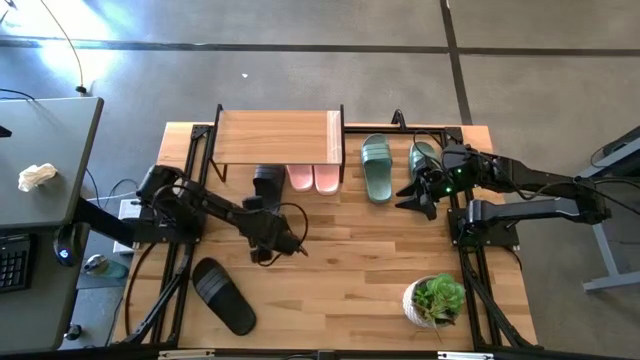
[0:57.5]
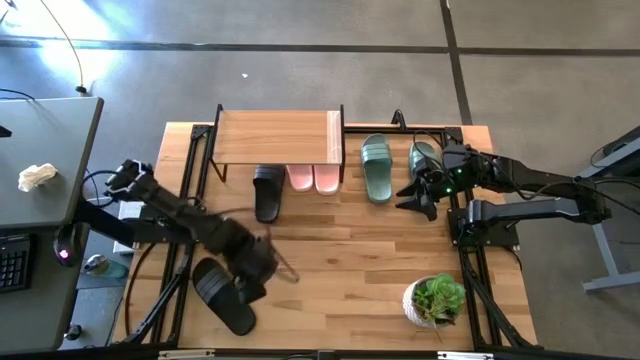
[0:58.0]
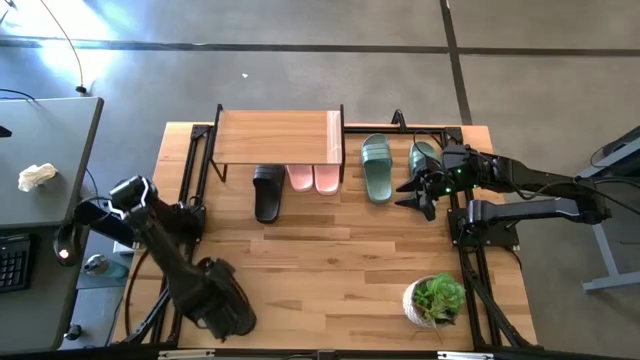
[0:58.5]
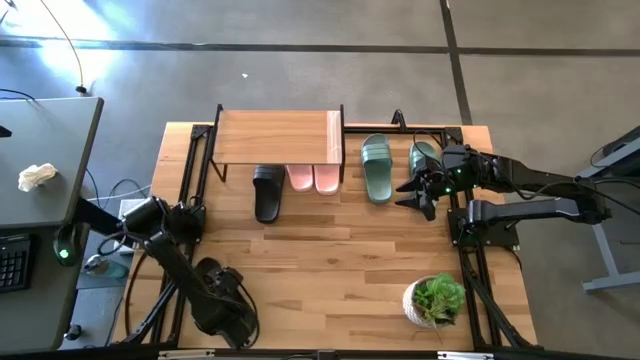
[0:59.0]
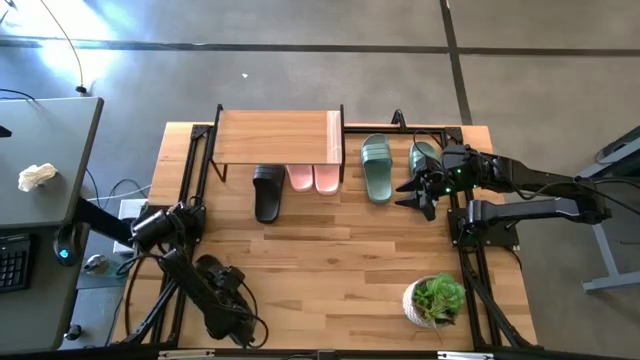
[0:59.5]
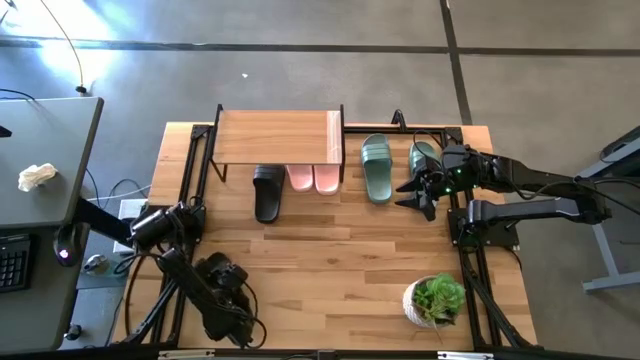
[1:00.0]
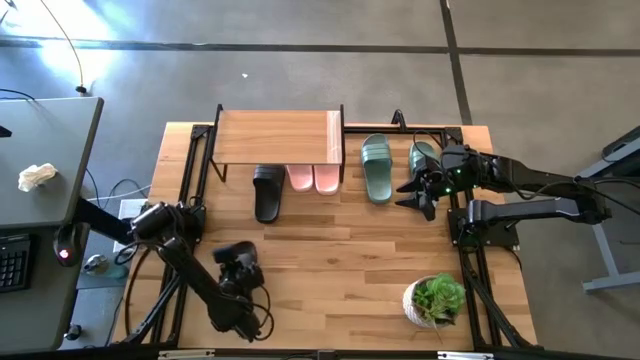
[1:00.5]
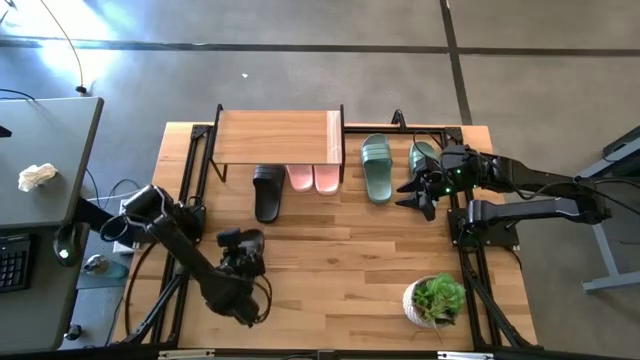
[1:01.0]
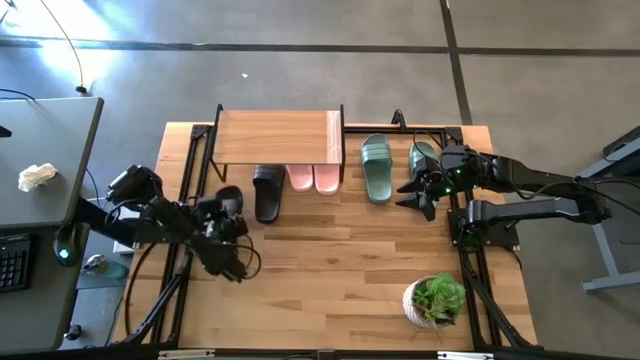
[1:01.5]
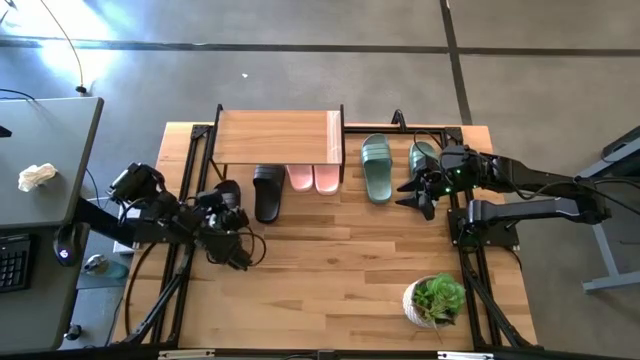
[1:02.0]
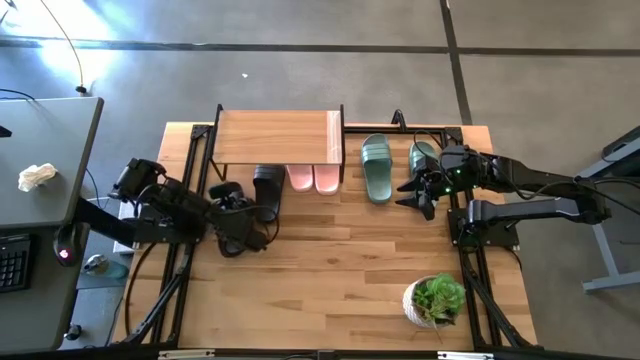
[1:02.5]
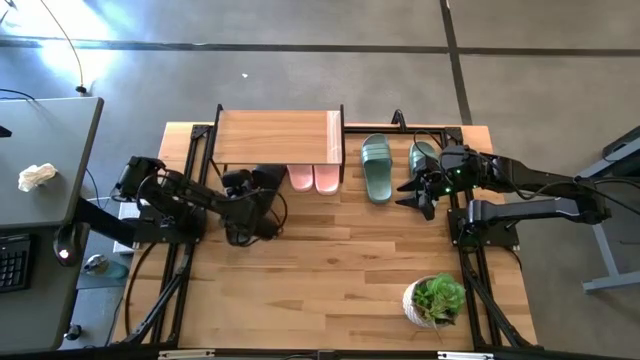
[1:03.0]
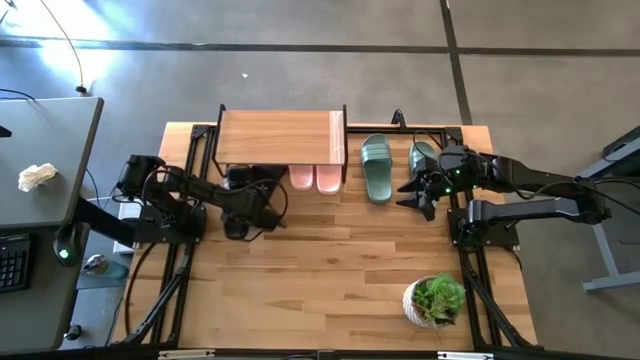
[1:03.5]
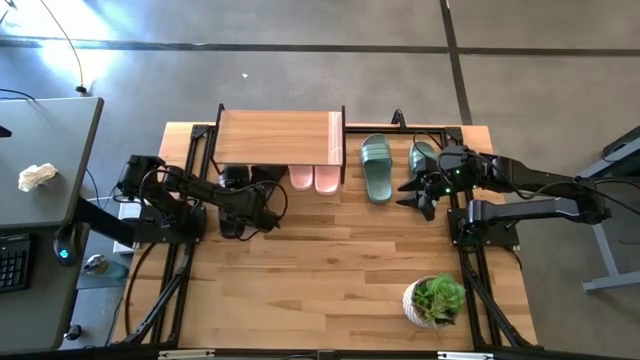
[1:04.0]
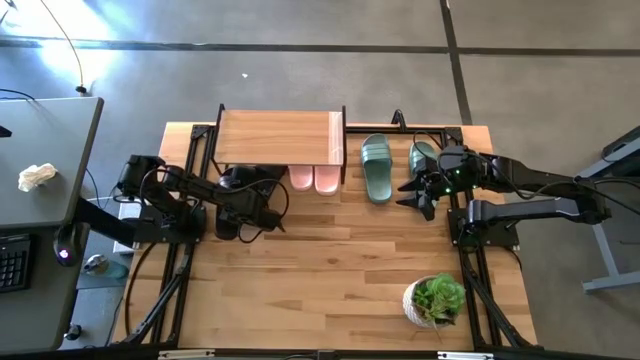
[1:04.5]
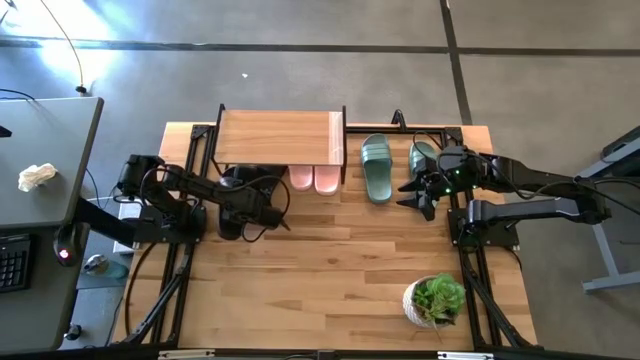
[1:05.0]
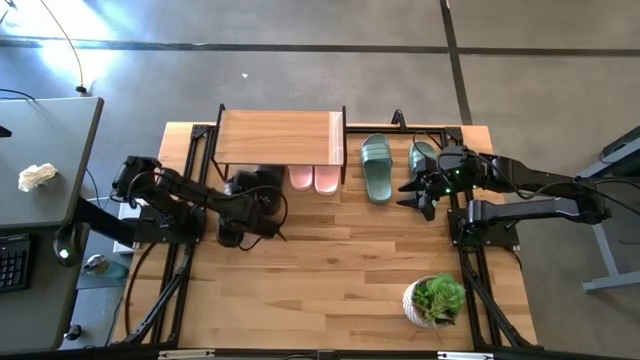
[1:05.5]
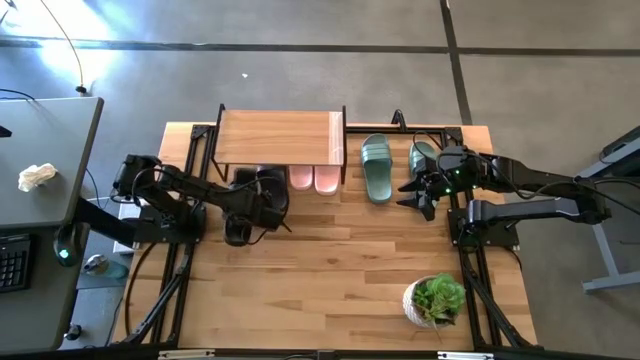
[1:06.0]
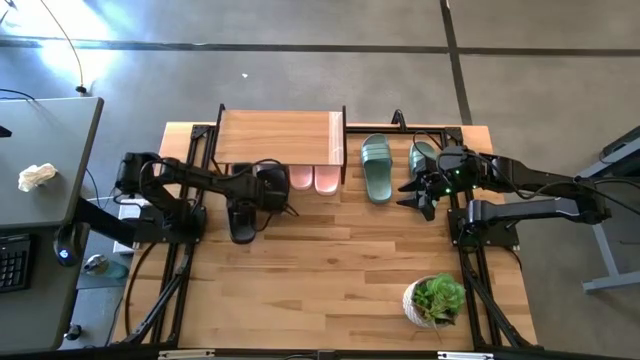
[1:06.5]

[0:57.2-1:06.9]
Task: Pick and place slides into the shelf
Put the left black slipper under the shelf

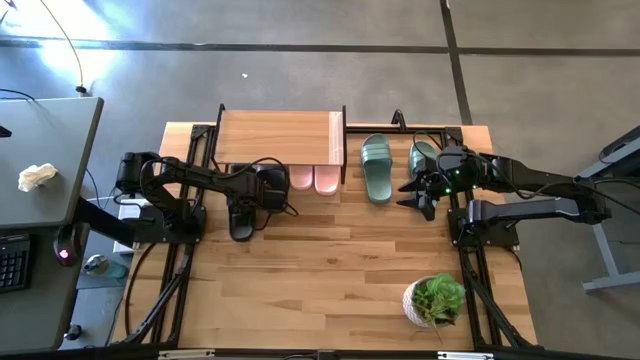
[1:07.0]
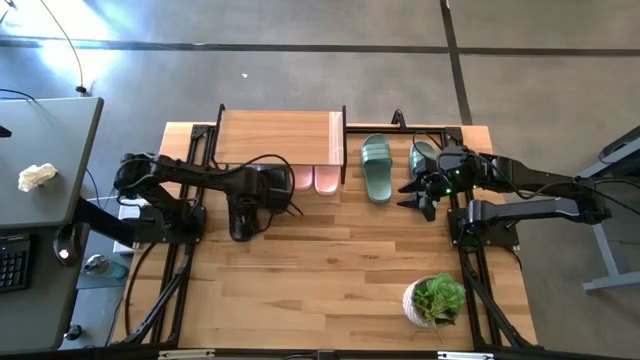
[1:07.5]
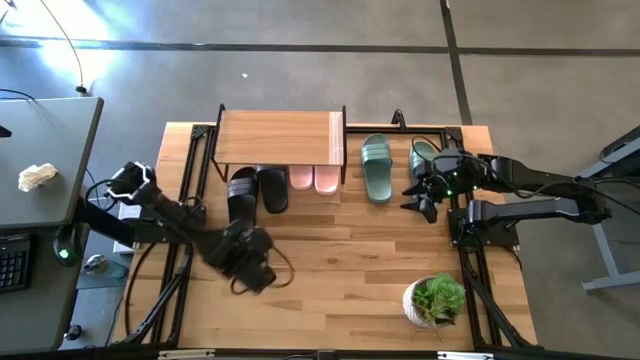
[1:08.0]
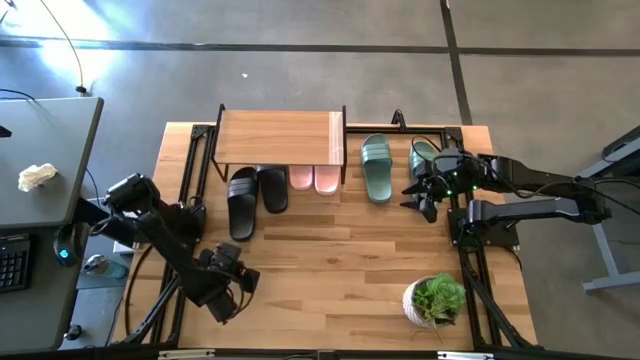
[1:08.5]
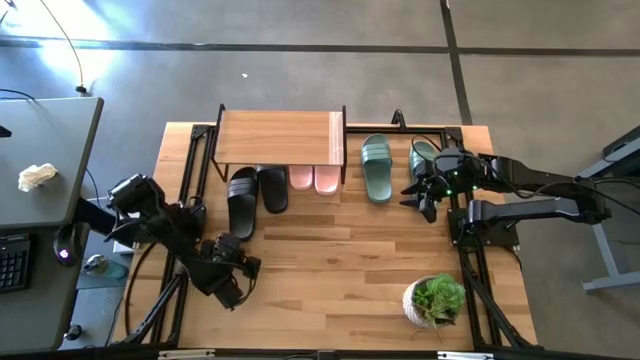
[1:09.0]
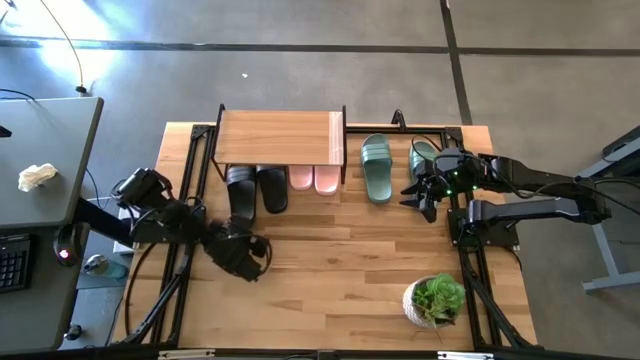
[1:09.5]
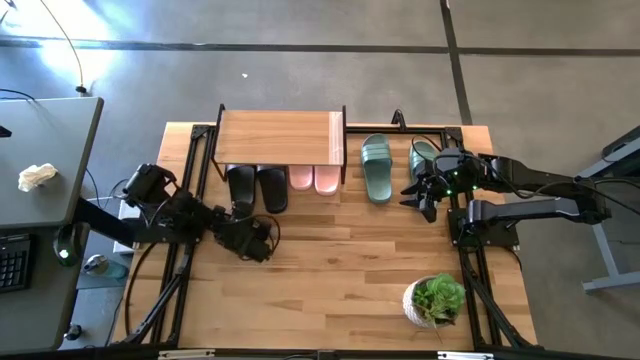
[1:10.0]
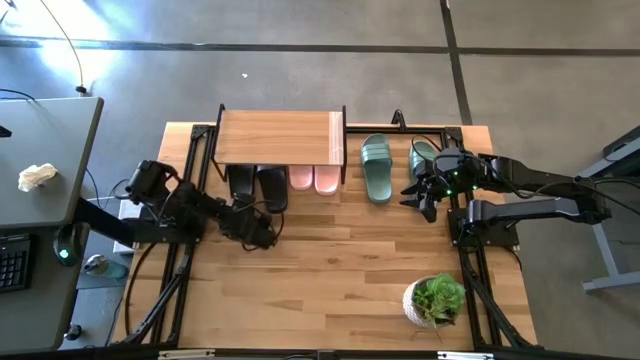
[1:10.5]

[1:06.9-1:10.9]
Adjust the left black slipper under the shelf

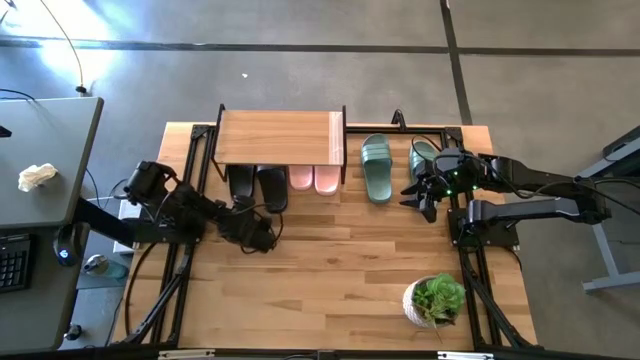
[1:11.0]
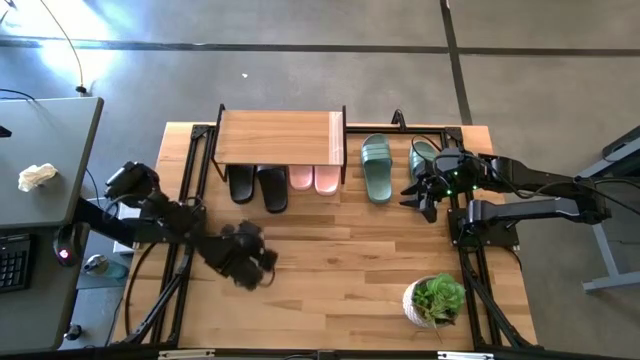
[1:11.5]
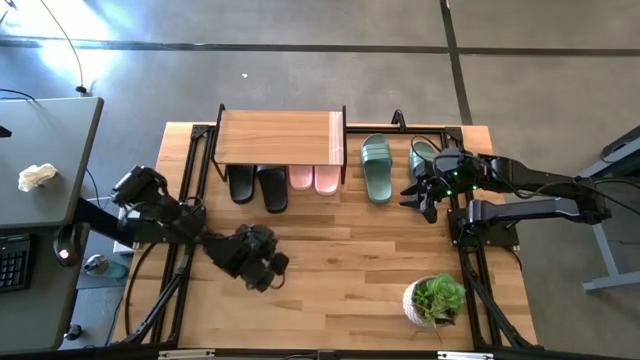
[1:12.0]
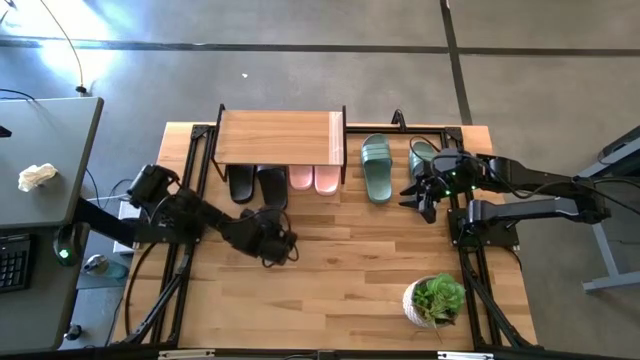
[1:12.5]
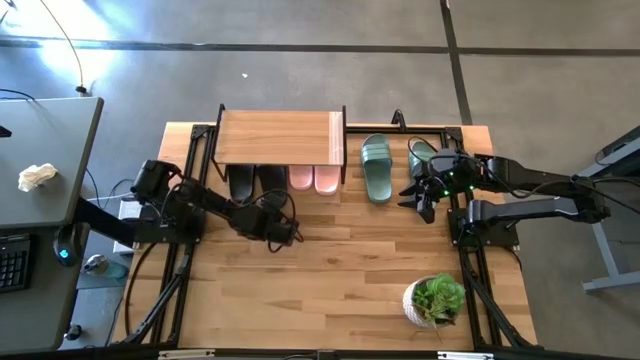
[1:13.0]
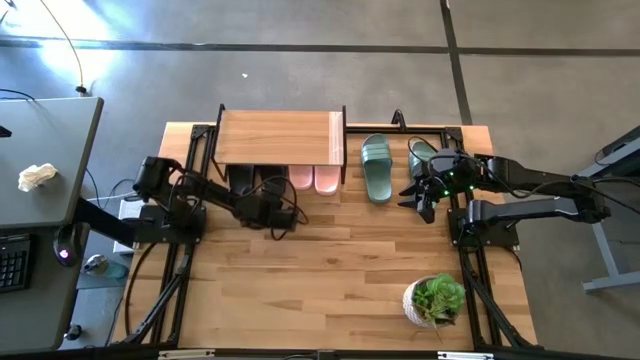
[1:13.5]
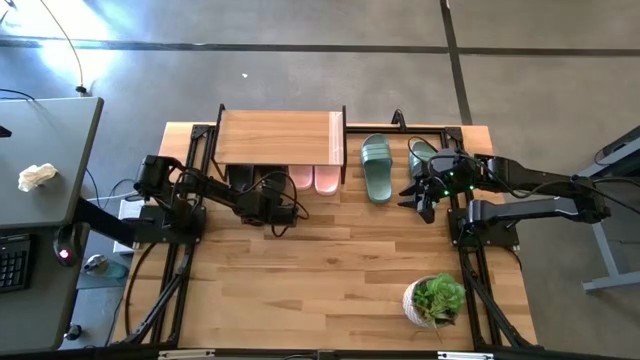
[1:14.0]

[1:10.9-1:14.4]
Adjust the right black slipper under the shelf

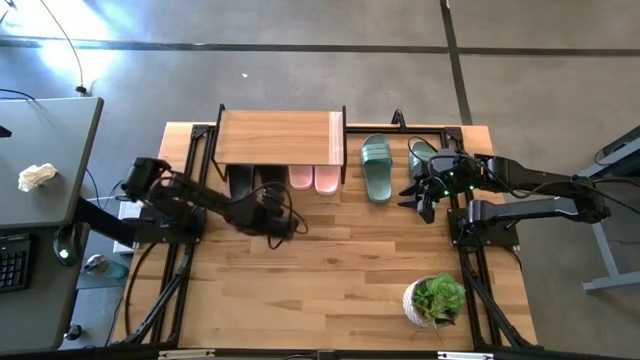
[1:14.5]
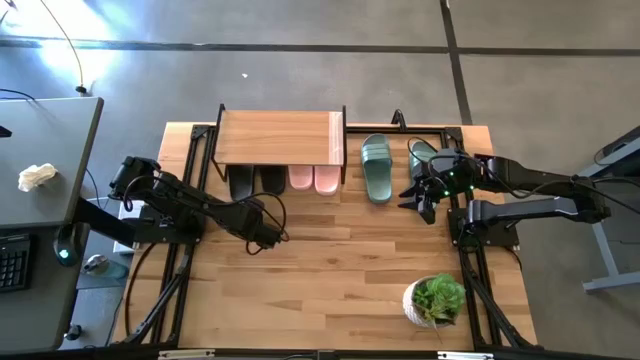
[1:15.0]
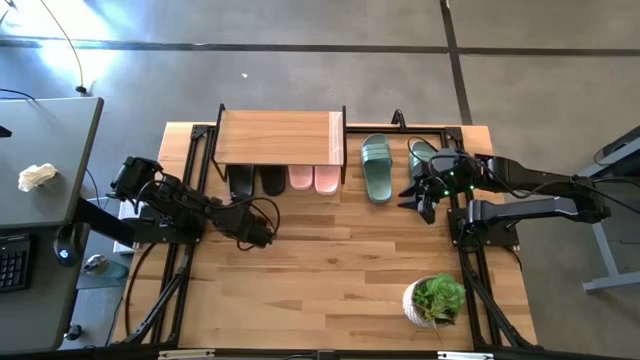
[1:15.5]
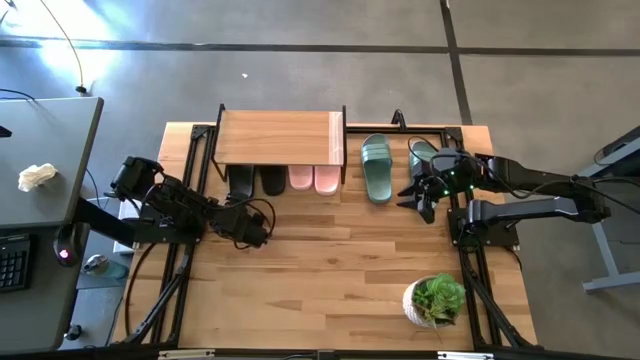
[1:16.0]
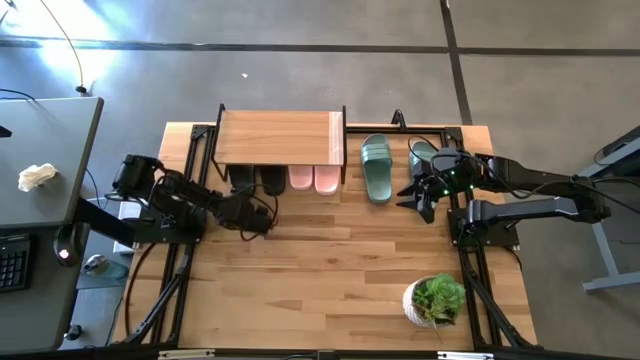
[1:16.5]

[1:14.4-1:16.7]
Adjust the left black slipper under the shelf
